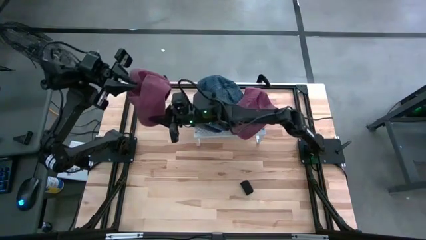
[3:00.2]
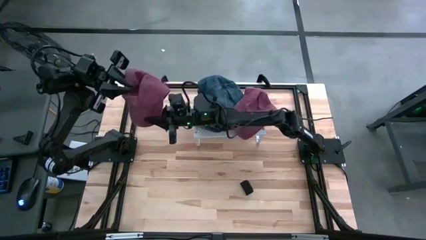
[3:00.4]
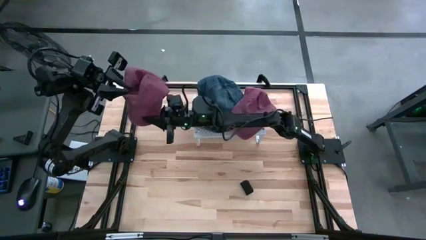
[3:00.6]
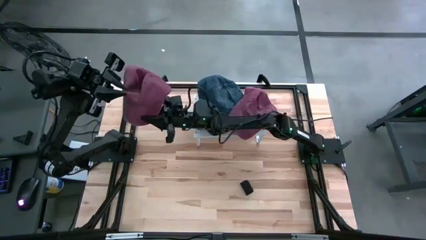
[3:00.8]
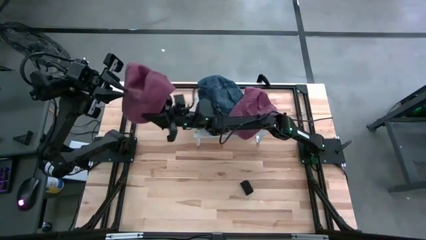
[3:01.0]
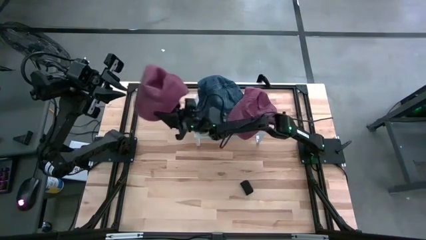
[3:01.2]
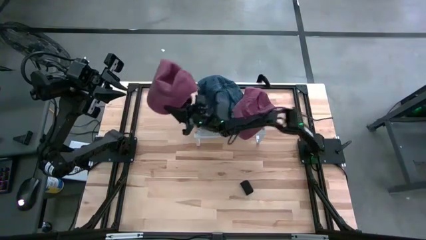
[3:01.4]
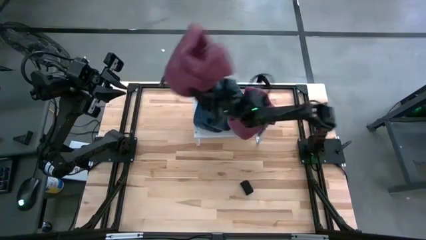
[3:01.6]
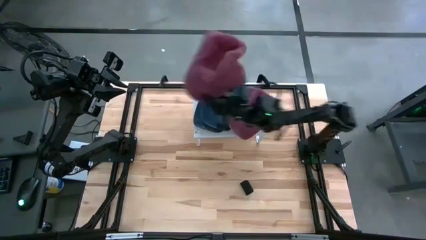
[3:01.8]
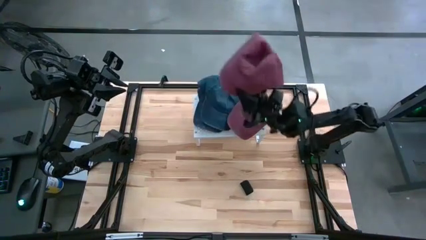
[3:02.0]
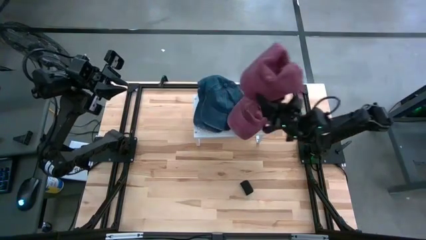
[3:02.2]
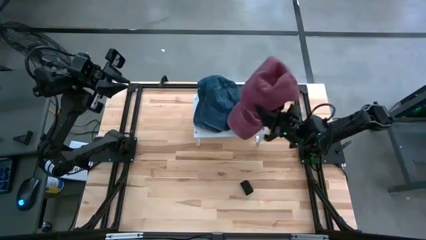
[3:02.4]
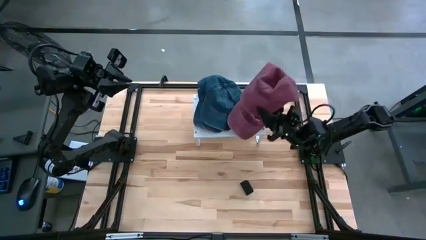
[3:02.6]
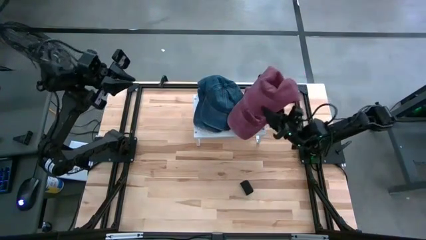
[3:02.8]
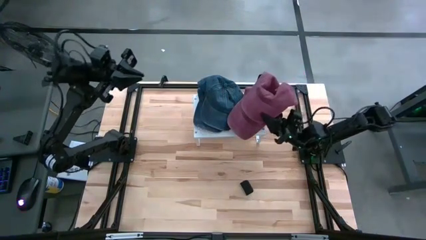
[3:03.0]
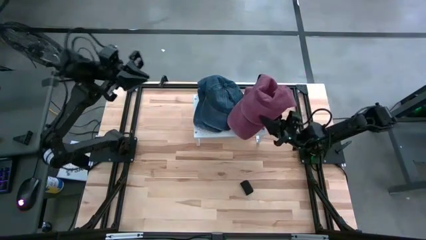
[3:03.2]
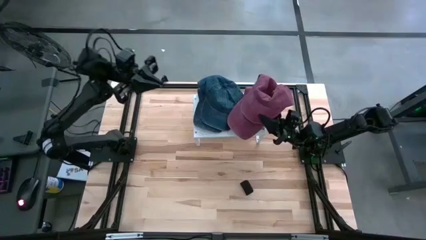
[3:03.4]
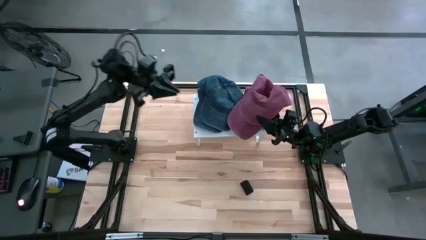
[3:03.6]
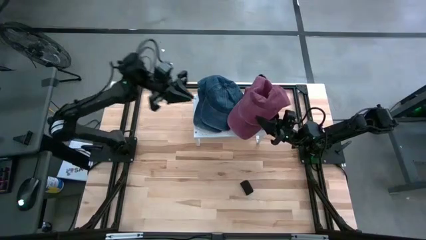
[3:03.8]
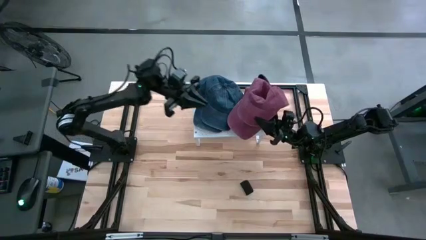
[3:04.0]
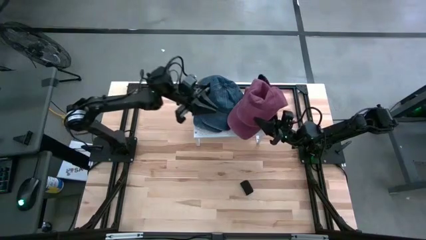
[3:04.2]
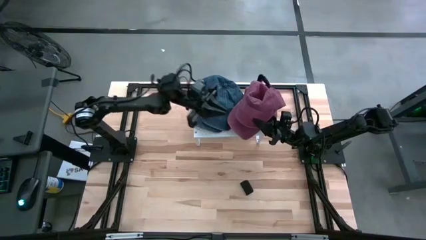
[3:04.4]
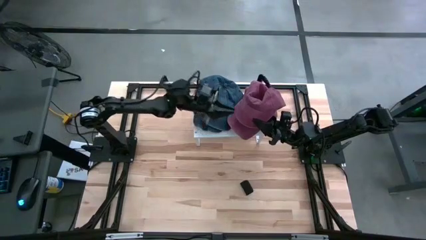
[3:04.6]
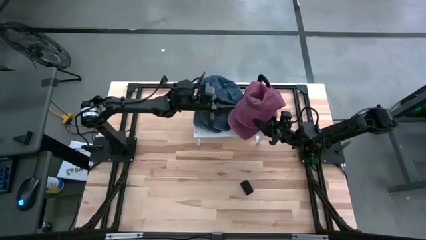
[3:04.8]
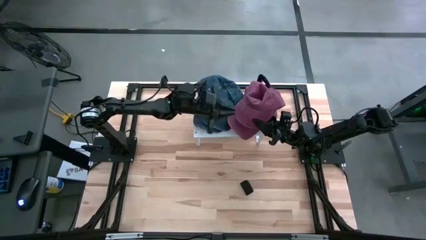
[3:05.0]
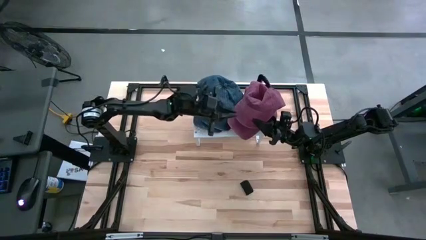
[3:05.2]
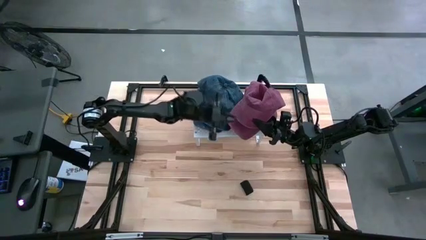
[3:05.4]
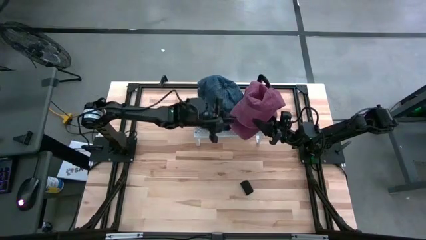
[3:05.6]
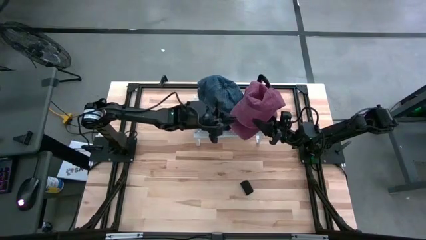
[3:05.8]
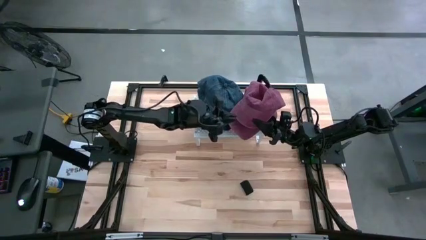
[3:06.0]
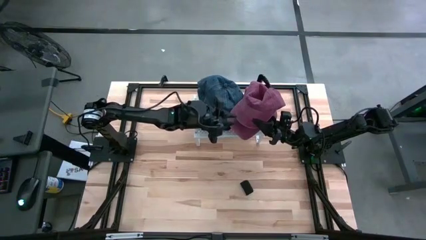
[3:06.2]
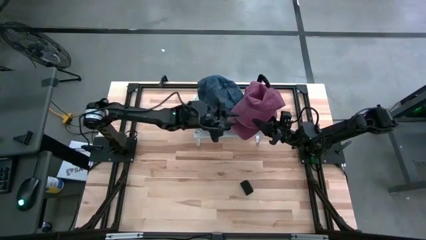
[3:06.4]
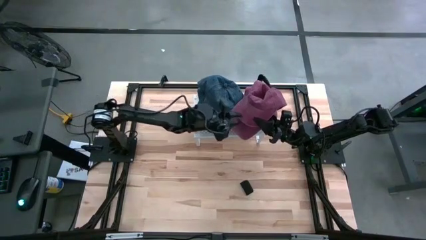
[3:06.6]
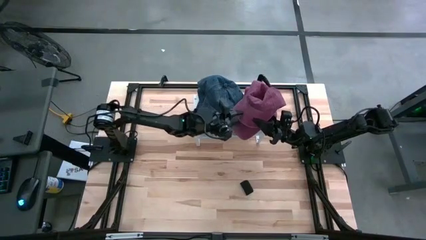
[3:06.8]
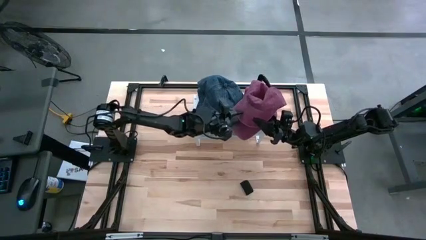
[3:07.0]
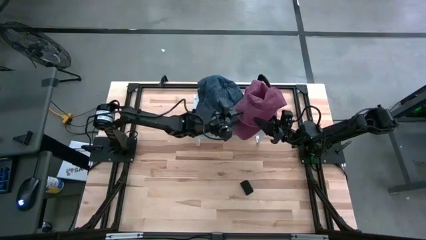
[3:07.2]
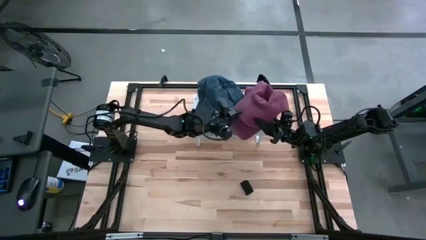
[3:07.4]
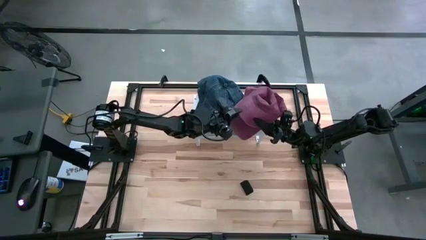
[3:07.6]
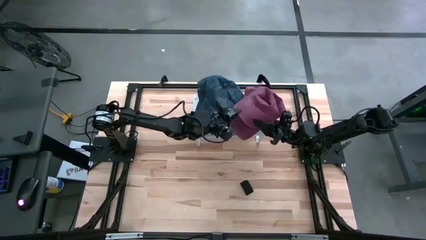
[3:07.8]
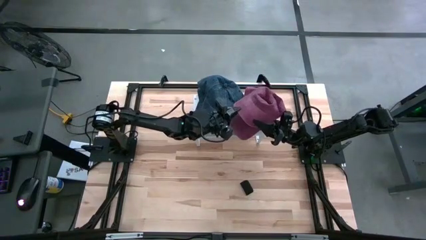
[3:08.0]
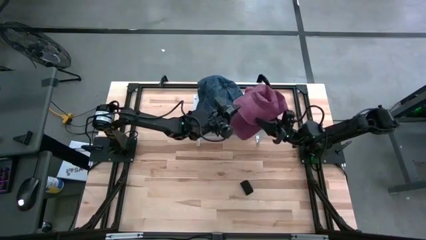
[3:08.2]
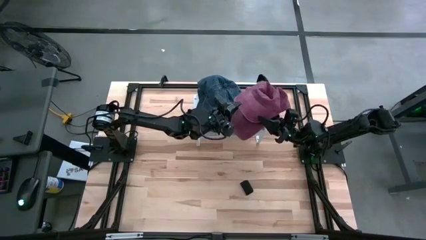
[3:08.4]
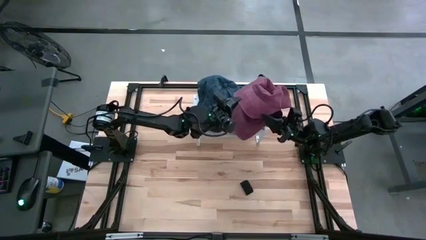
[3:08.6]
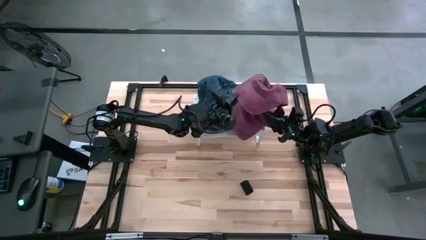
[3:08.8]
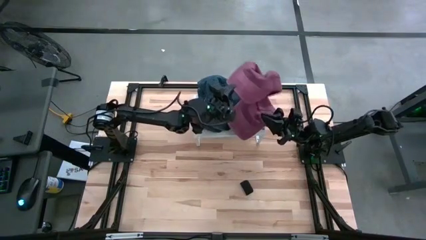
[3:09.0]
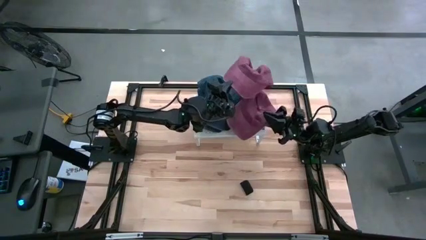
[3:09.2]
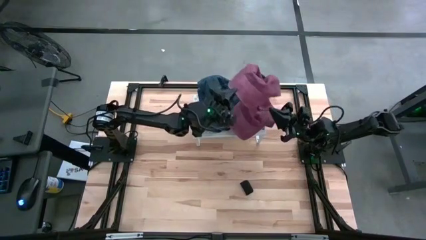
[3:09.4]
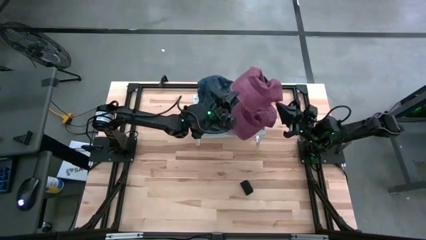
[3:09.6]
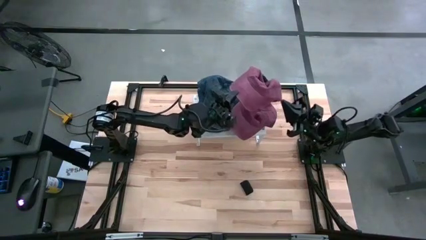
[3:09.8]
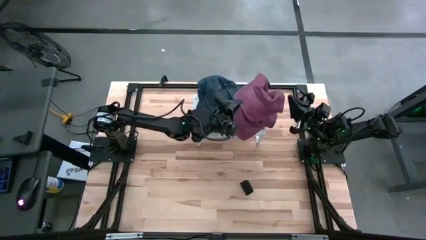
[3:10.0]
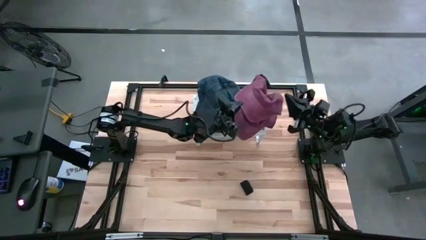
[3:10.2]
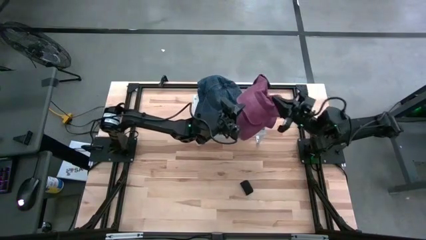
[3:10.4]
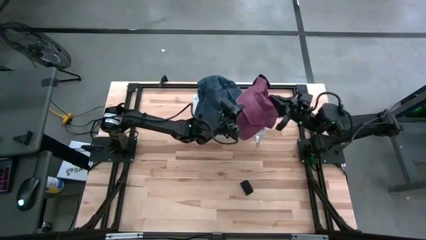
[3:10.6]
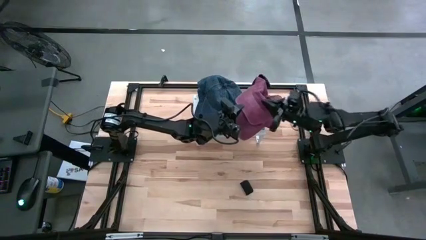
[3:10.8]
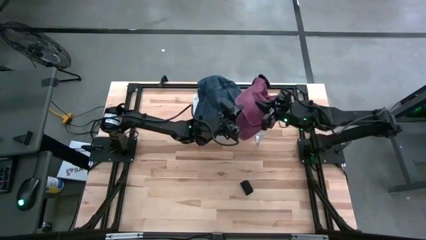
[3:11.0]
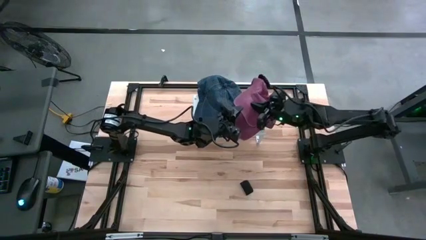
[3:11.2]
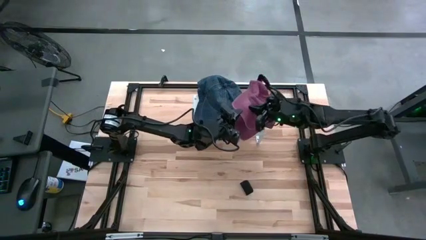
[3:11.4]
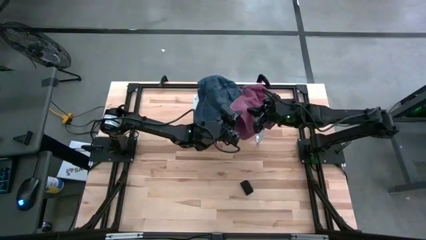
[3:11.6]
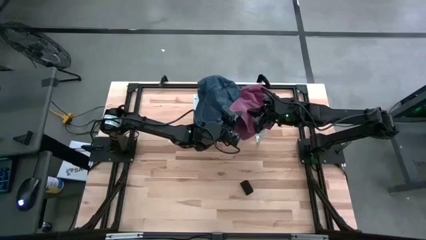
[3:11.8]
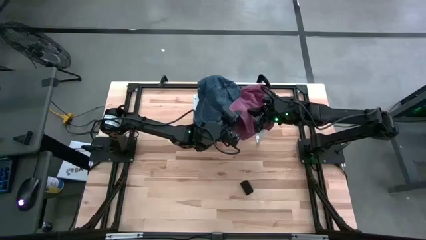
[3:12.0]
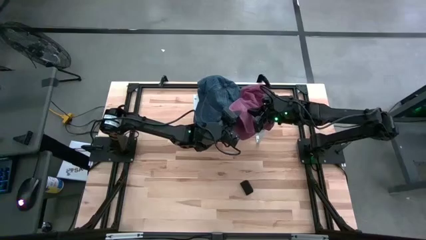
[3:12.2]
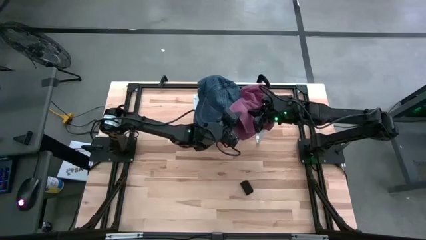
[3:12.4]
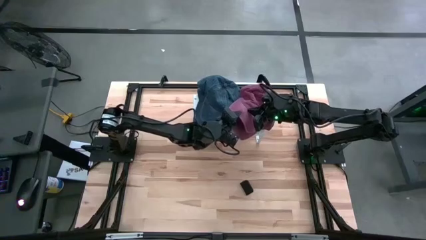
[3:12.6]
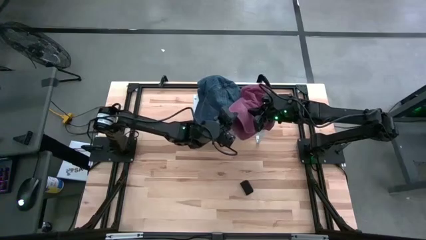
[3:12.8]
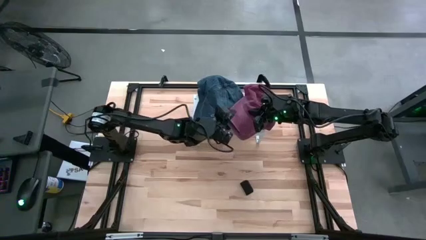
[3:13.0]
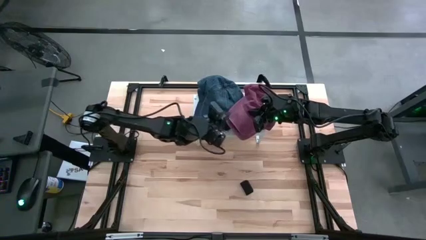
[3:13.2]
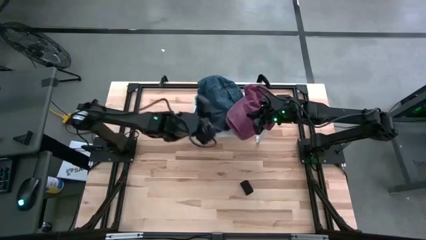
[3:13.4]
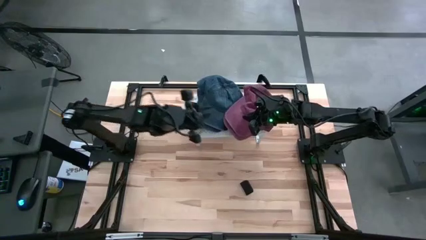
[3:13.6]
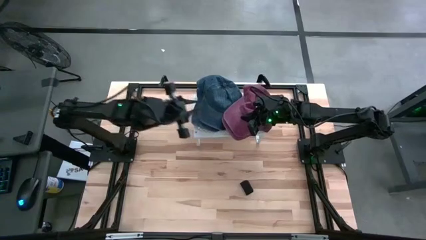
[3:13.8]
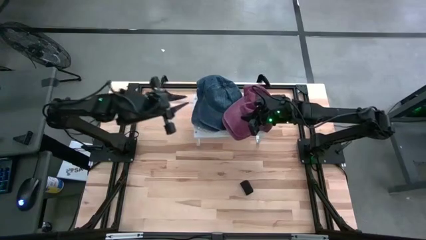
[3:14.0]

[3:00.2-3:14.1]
Task: Pick & Place hat
Stack the red cap on top of the other red cap on the shelf
